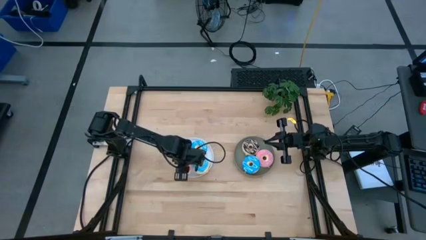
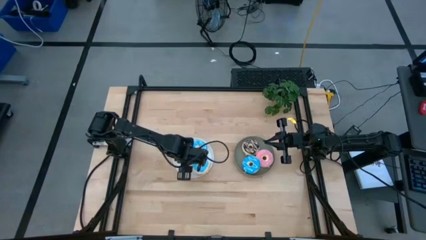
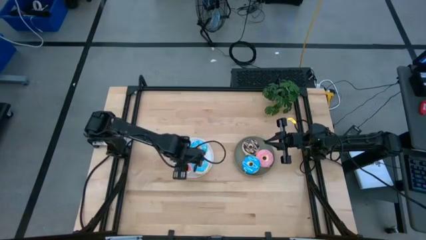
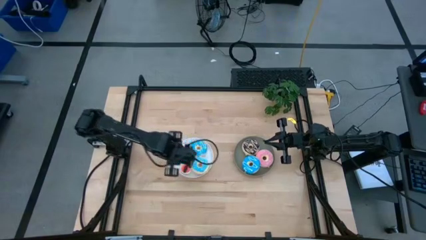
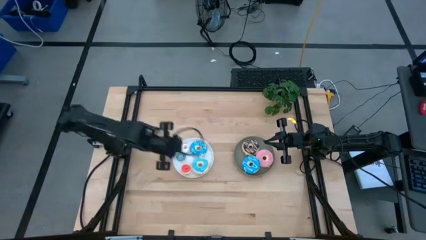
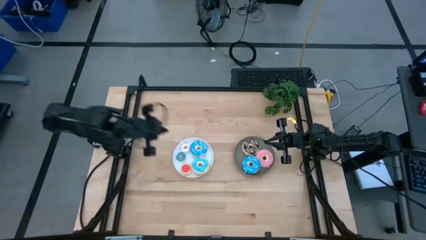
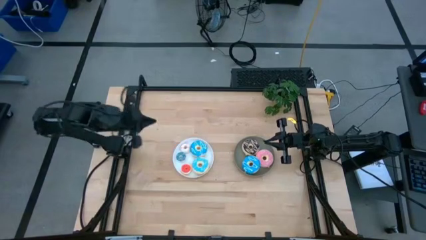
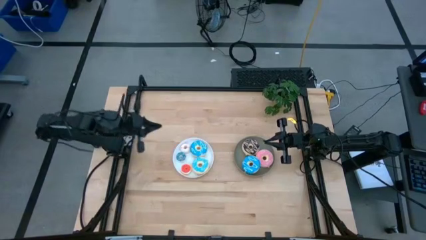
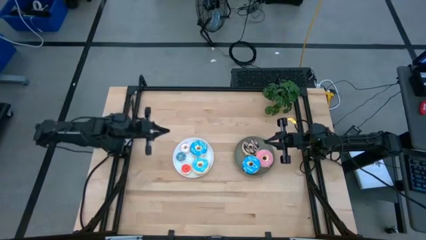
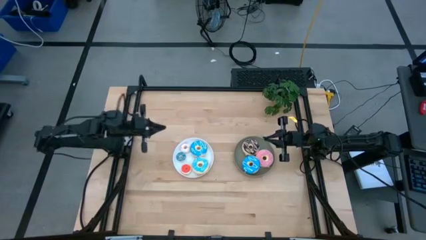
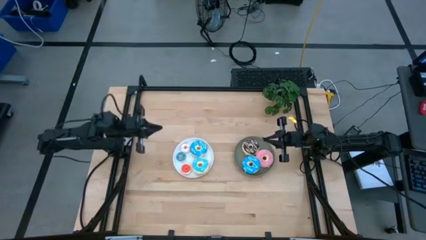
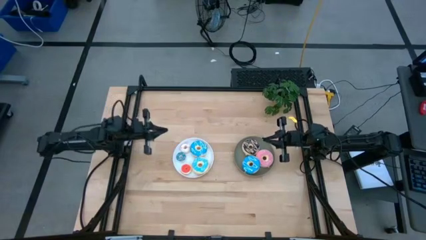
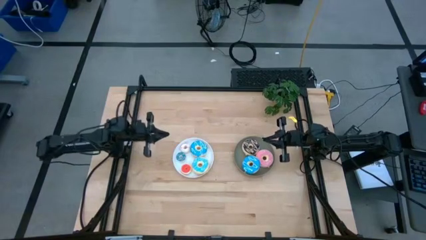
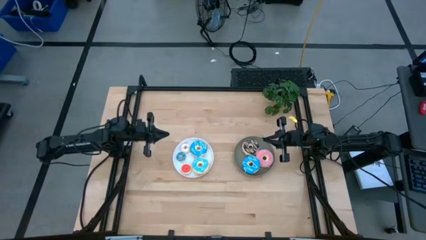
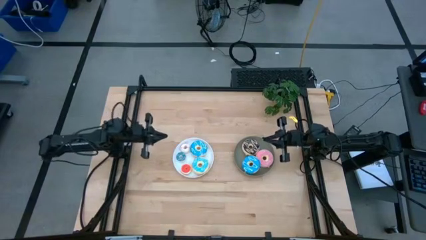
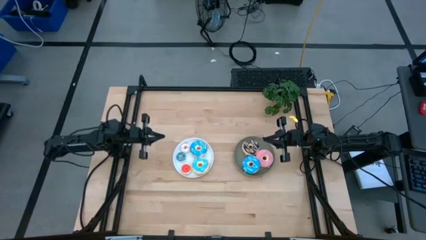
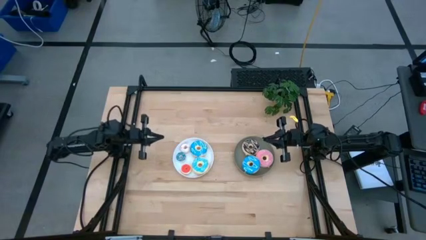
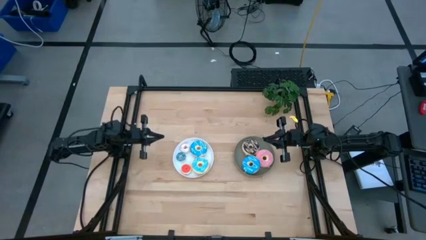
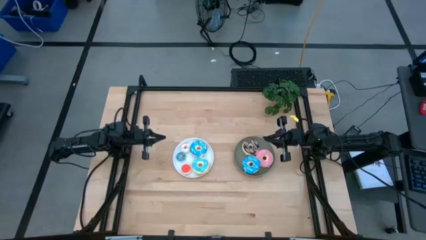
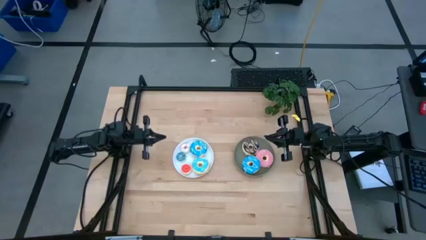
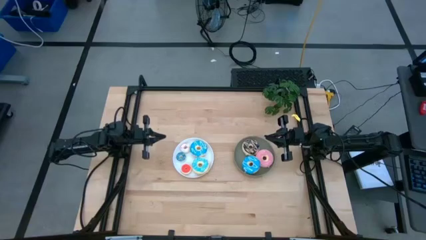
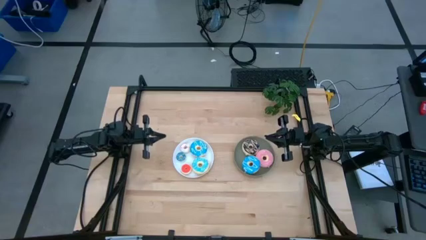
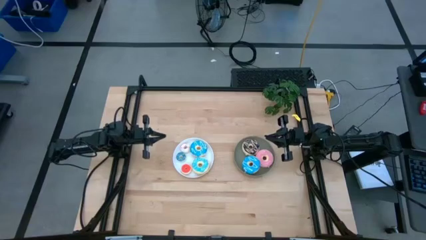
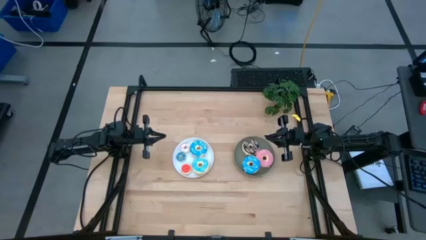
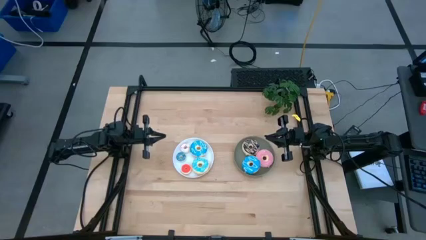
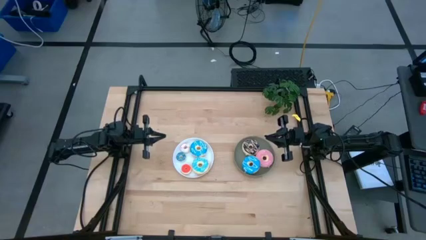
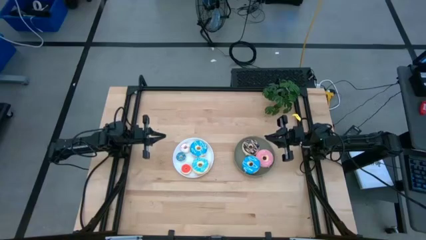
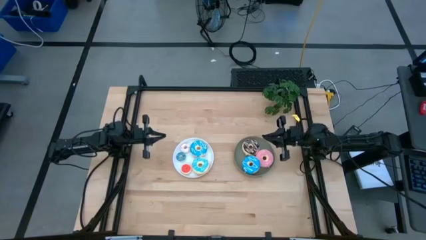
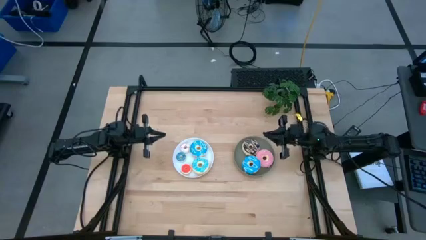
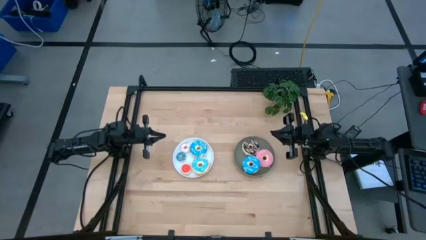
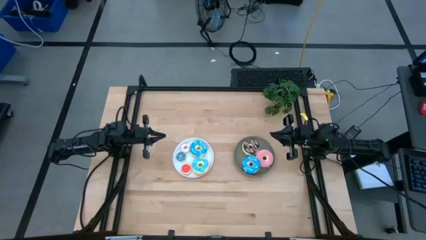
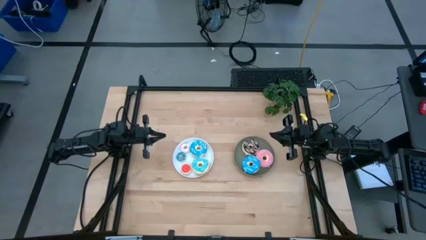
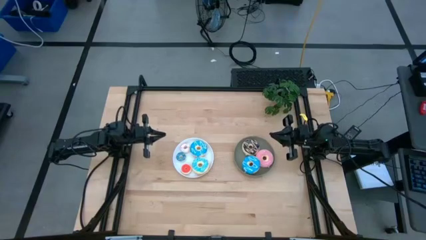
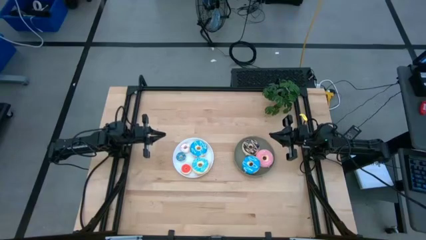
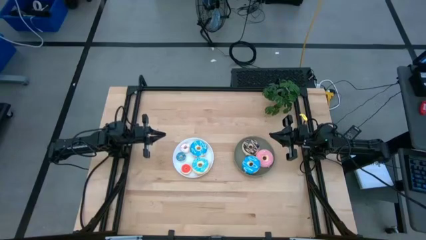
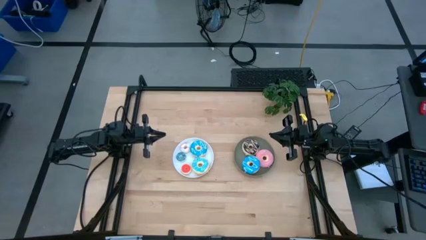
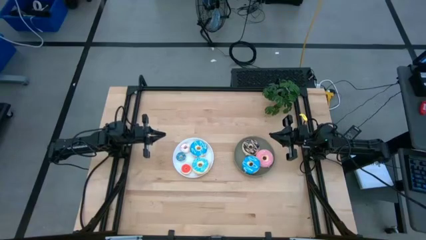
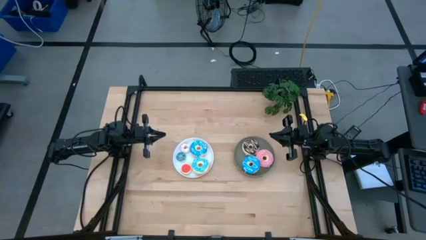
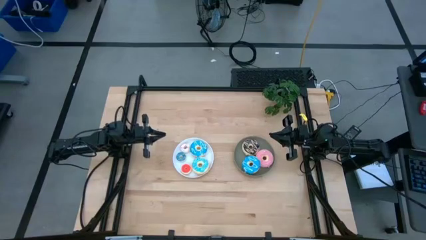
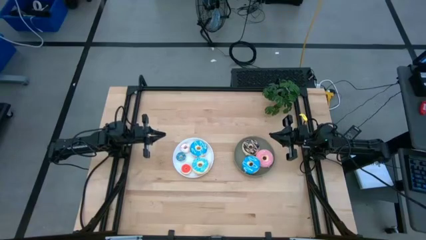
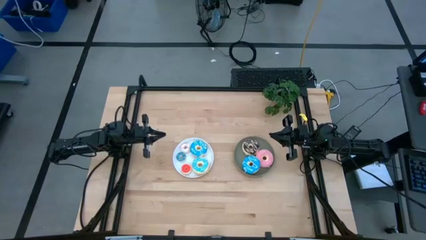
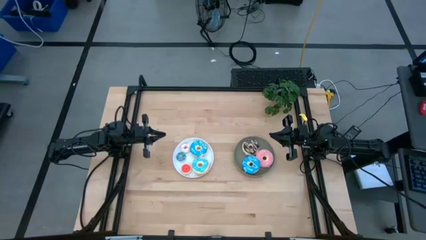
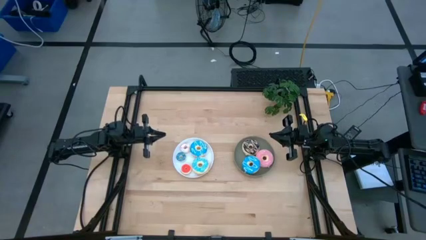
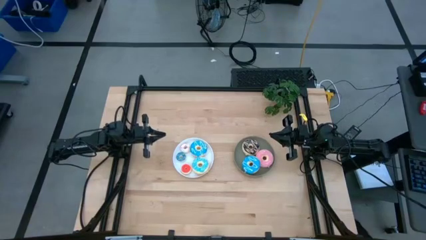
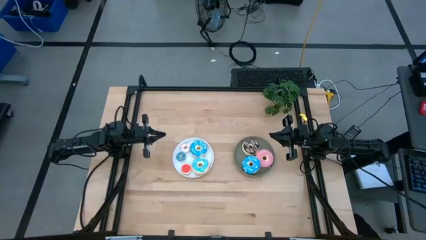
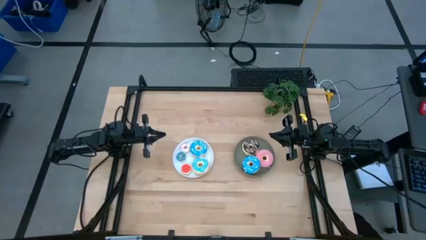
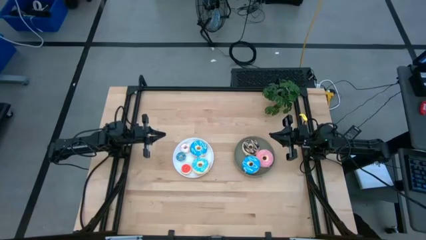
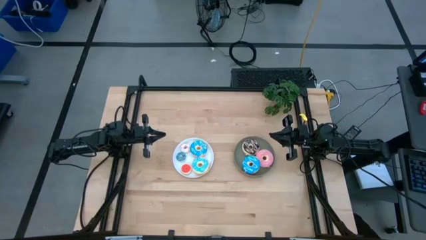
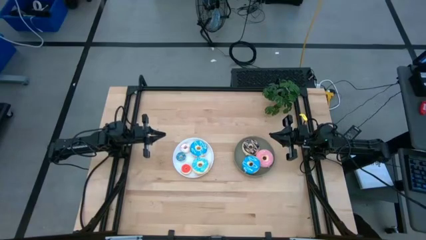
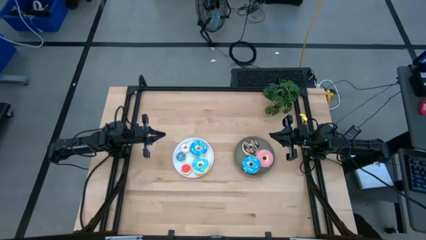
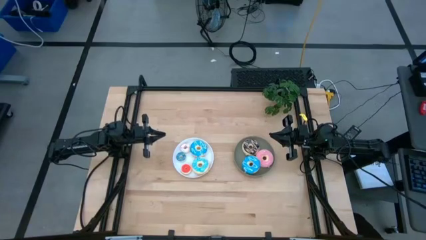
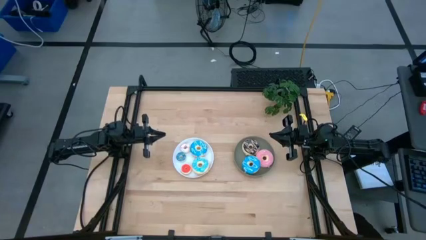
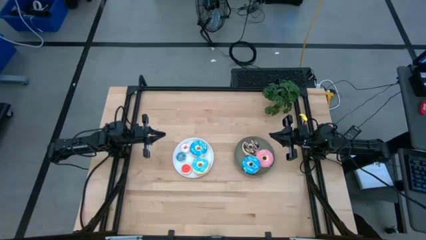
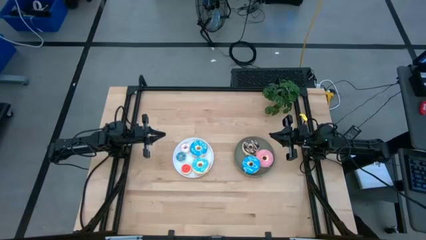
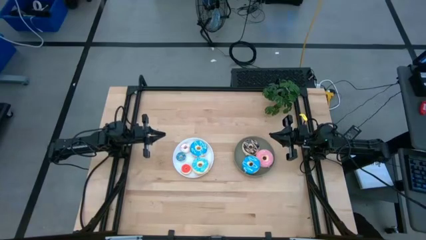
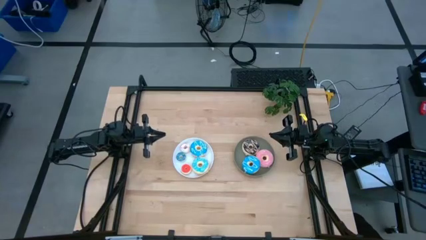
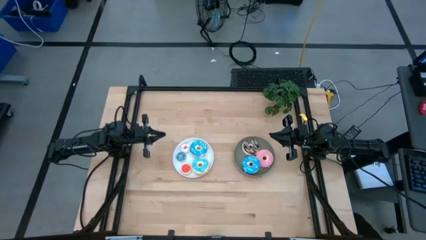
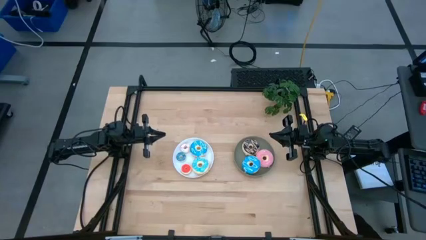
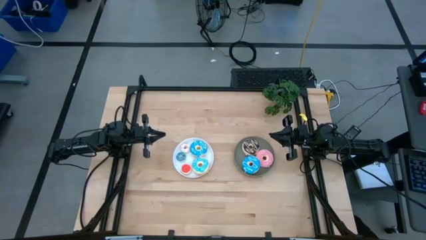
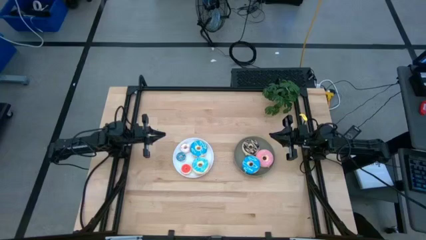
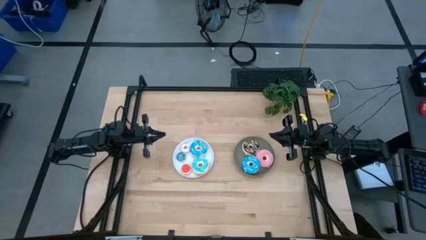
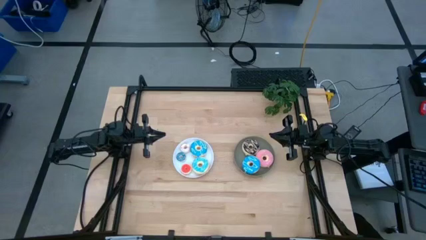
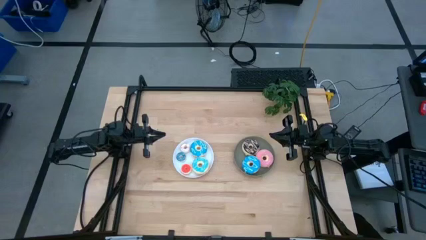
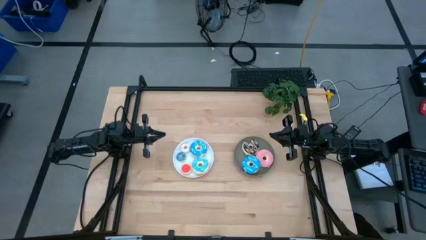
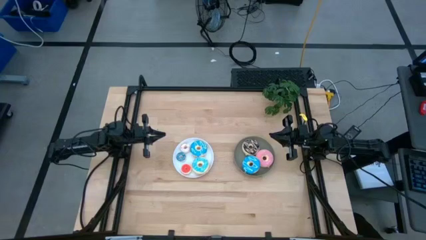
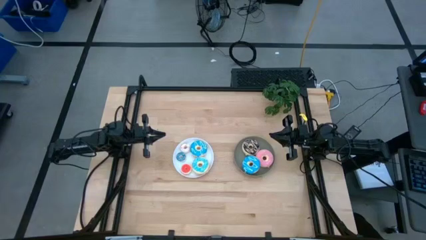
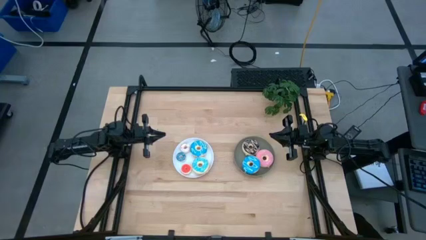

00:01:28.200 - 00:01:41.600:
Task: Pick & Place donuts
Return to Home Position

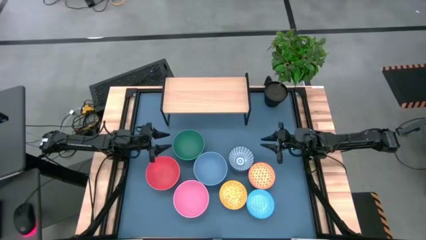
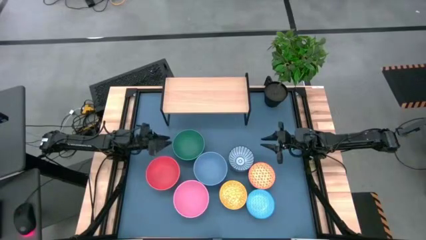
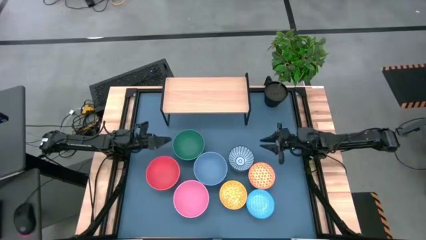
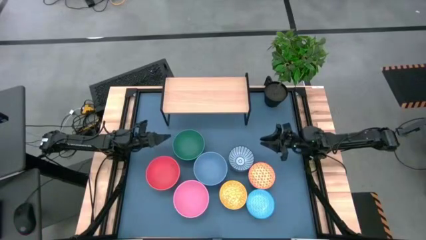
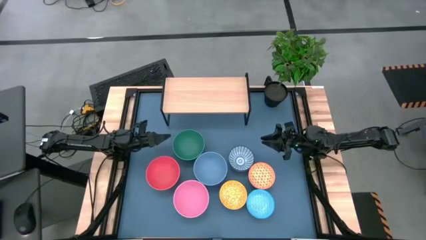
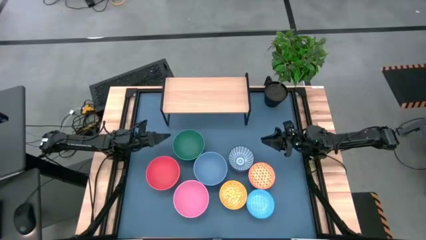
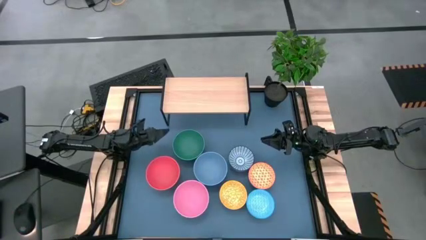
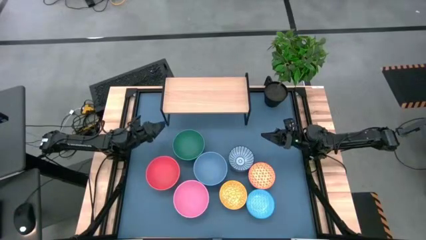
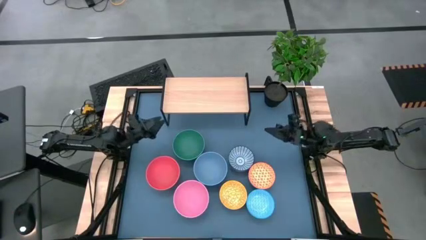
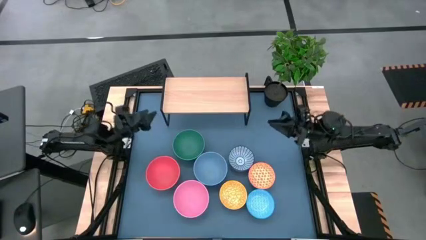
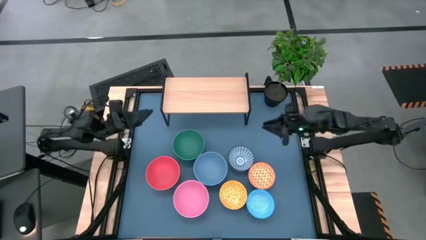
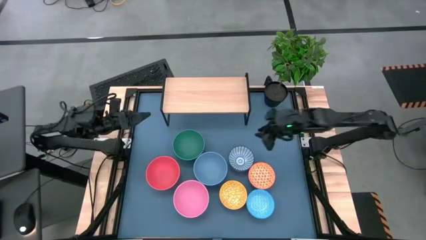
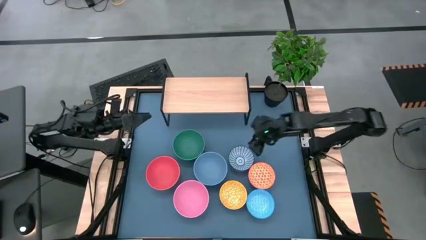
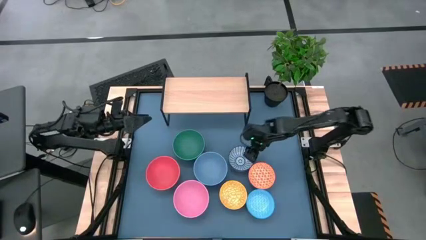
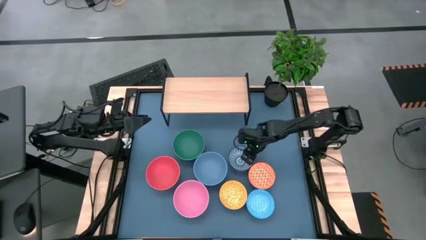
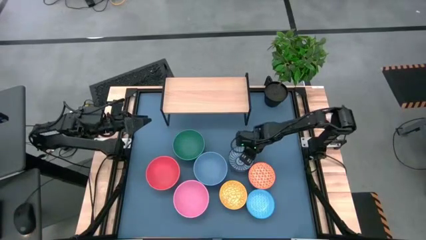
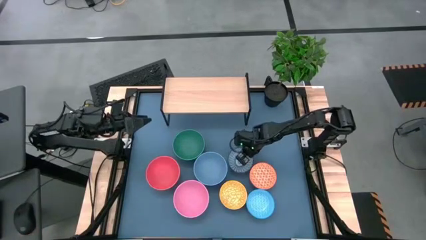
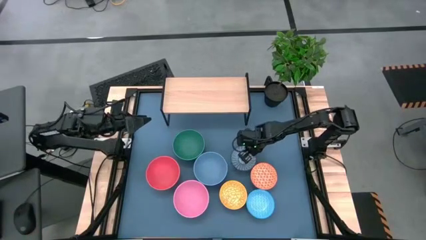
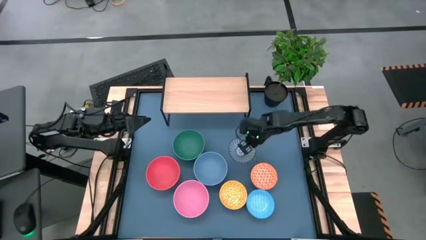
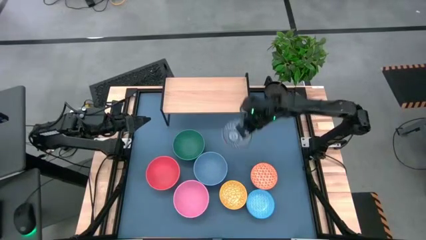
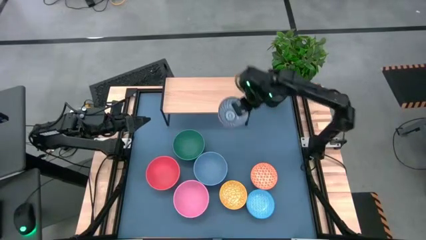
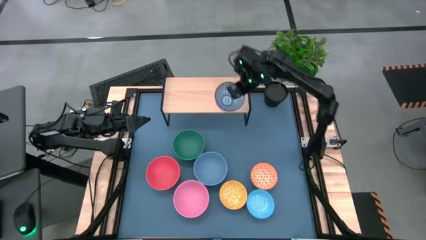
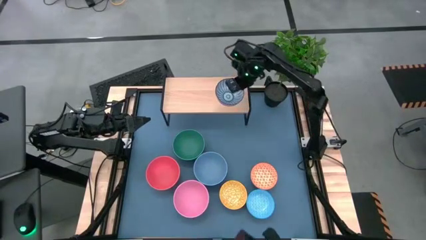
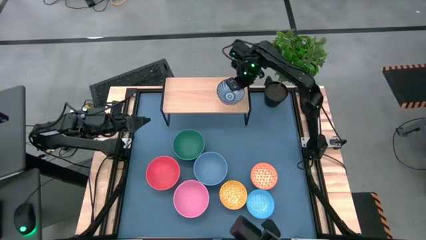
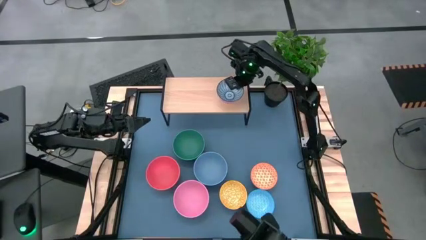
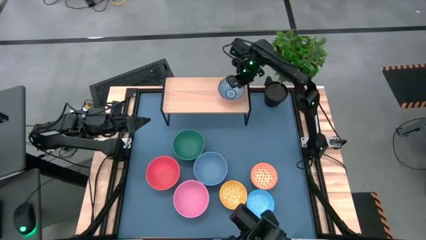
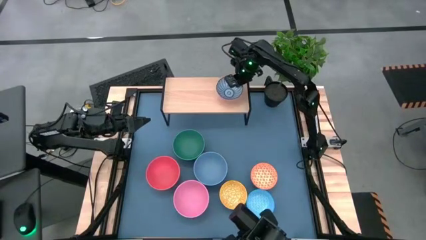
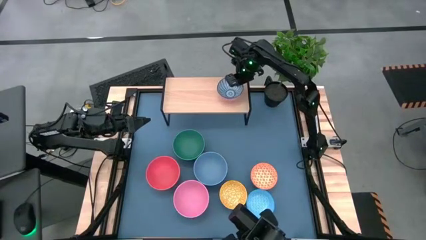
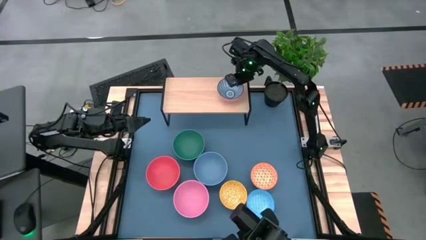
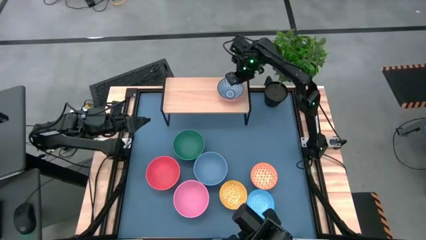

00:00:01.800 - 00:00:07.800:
Task: Place and stack bowls onto a shelf
Put the blue-patterned bowl on the shelf
